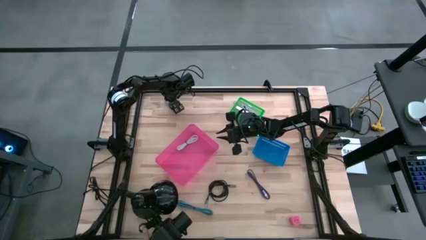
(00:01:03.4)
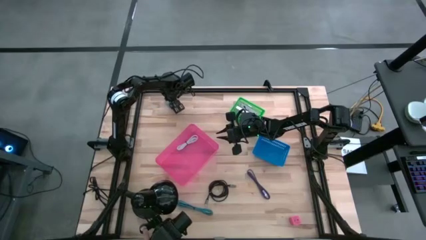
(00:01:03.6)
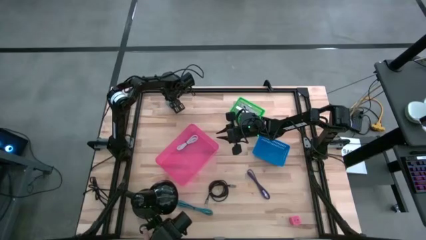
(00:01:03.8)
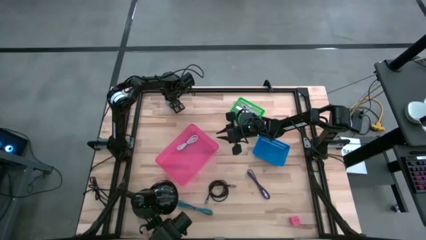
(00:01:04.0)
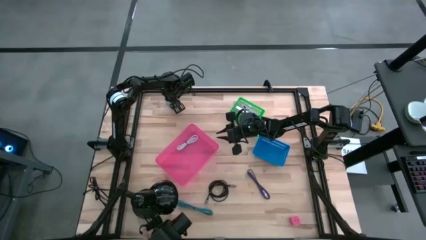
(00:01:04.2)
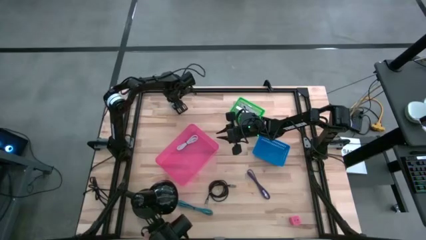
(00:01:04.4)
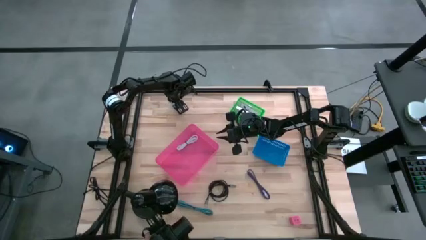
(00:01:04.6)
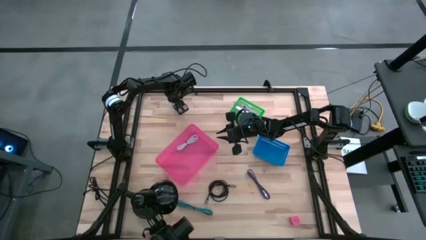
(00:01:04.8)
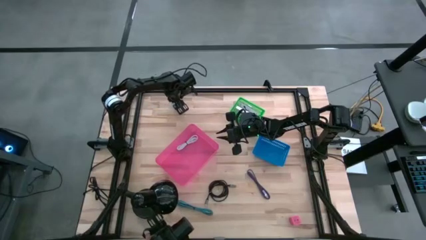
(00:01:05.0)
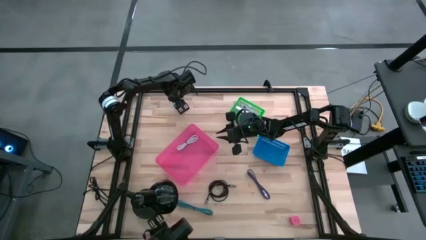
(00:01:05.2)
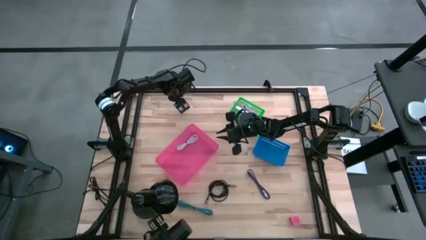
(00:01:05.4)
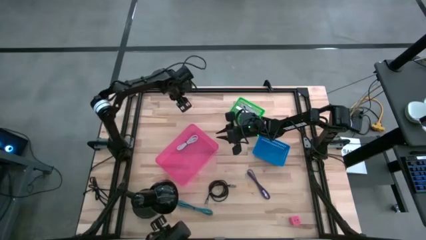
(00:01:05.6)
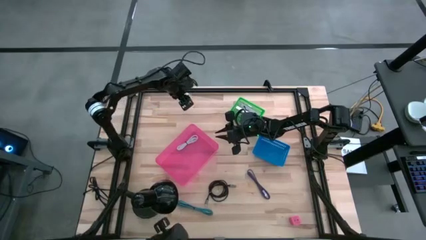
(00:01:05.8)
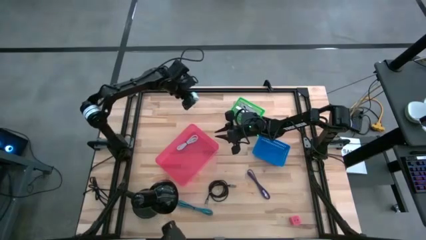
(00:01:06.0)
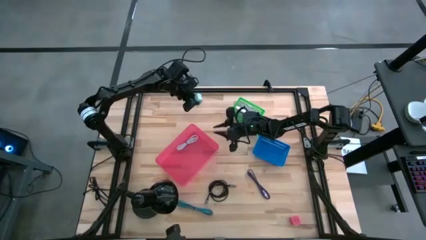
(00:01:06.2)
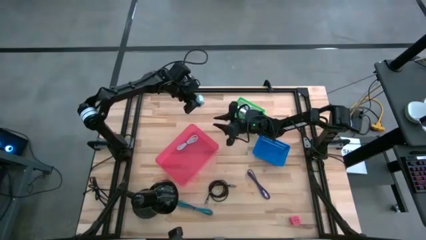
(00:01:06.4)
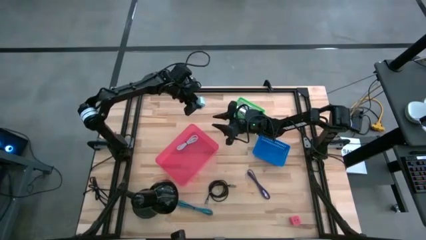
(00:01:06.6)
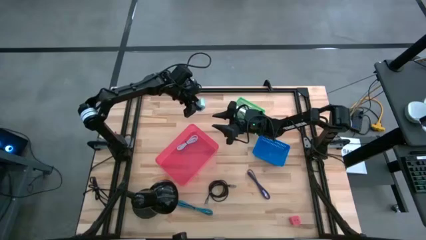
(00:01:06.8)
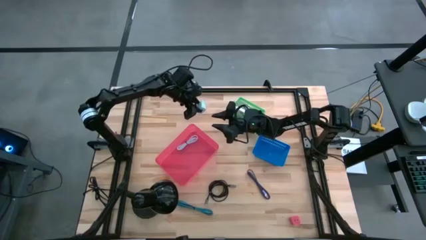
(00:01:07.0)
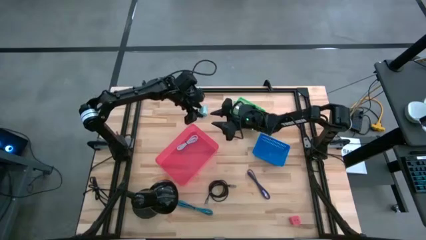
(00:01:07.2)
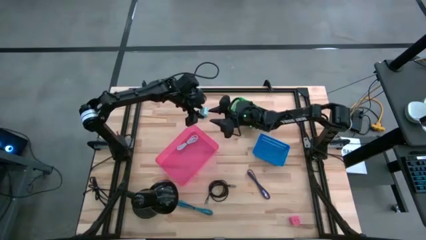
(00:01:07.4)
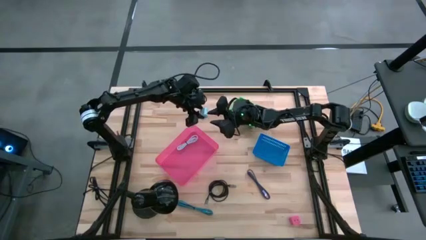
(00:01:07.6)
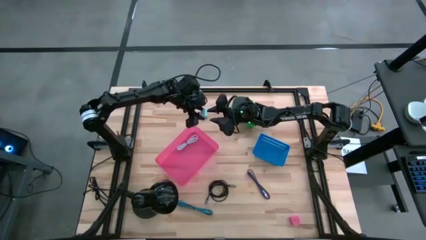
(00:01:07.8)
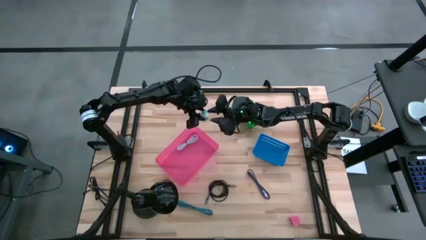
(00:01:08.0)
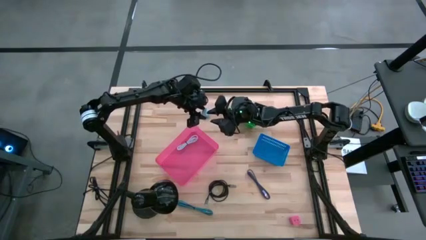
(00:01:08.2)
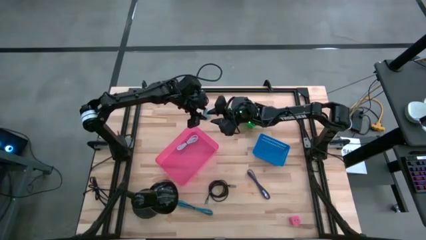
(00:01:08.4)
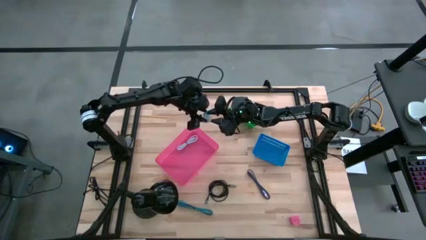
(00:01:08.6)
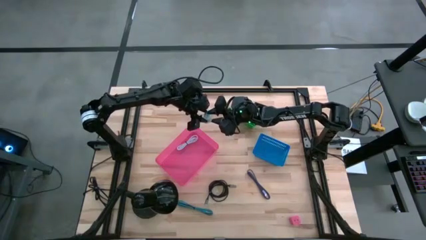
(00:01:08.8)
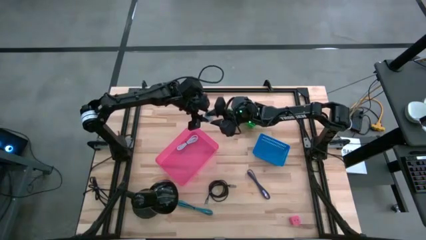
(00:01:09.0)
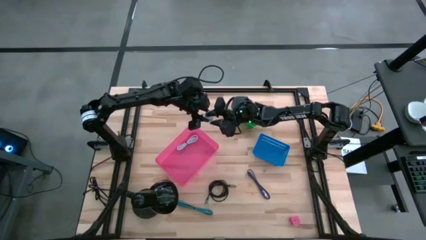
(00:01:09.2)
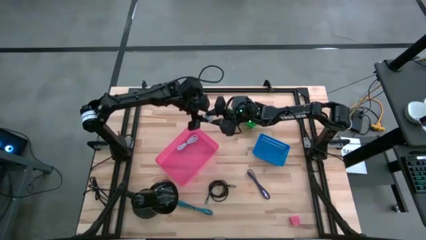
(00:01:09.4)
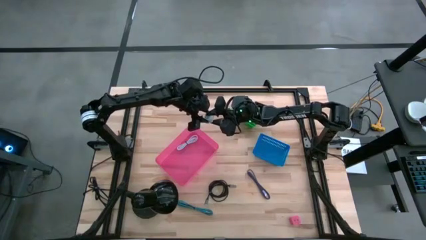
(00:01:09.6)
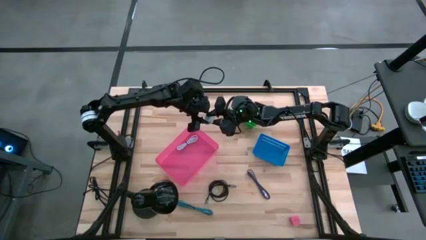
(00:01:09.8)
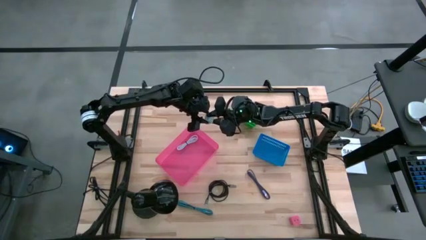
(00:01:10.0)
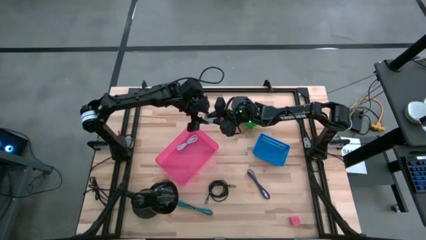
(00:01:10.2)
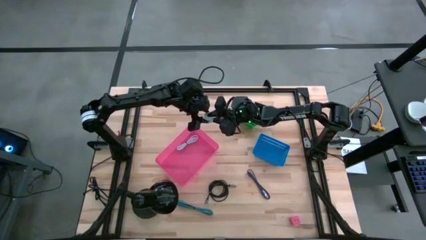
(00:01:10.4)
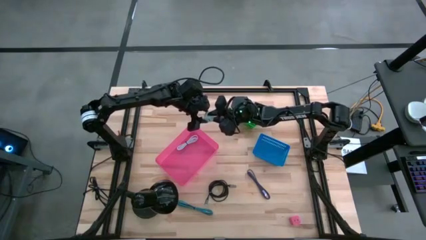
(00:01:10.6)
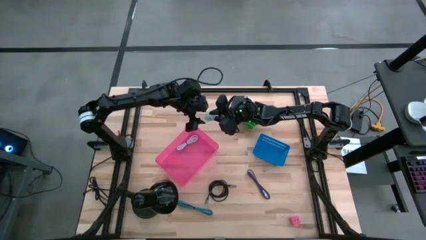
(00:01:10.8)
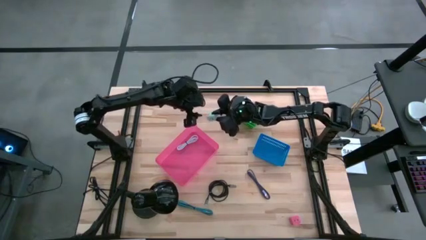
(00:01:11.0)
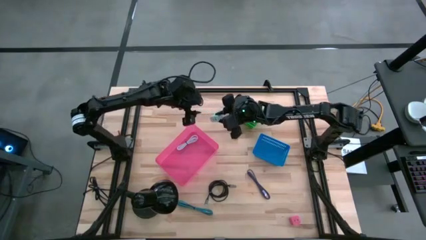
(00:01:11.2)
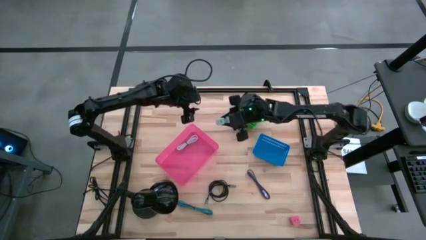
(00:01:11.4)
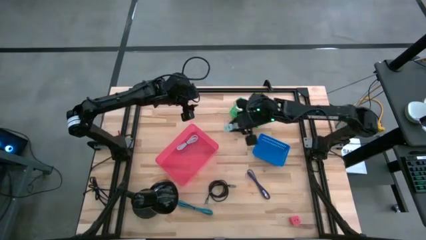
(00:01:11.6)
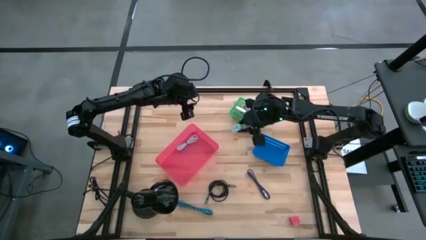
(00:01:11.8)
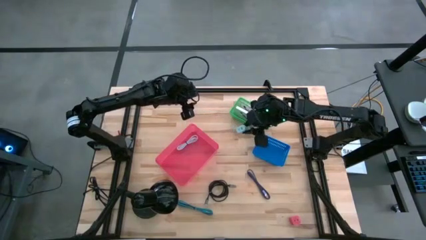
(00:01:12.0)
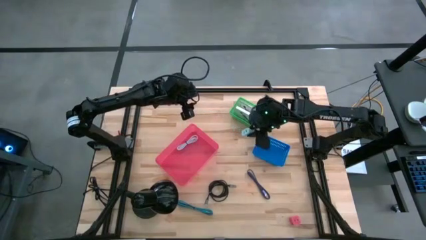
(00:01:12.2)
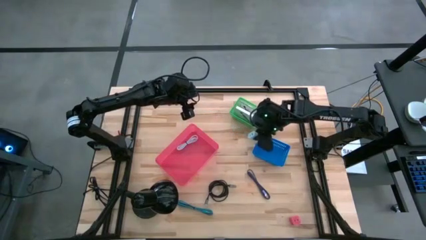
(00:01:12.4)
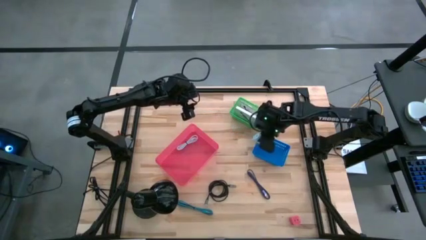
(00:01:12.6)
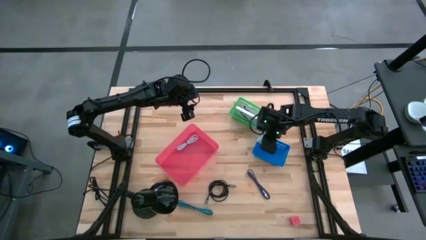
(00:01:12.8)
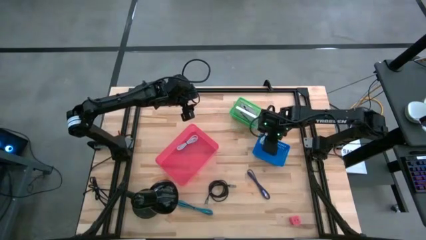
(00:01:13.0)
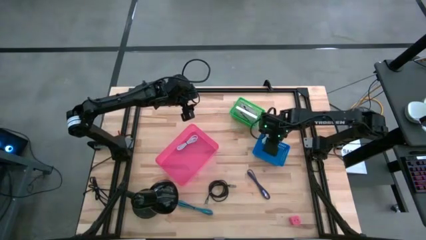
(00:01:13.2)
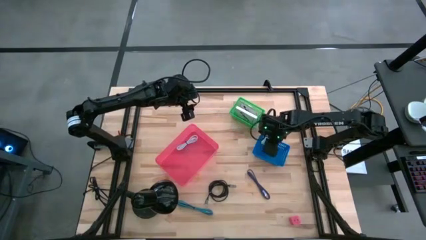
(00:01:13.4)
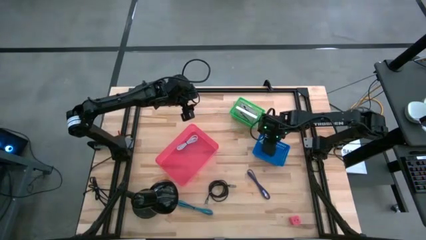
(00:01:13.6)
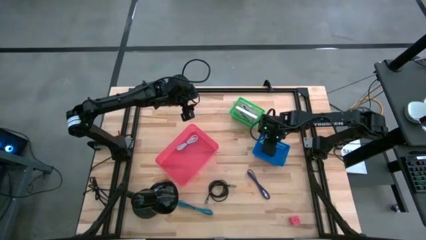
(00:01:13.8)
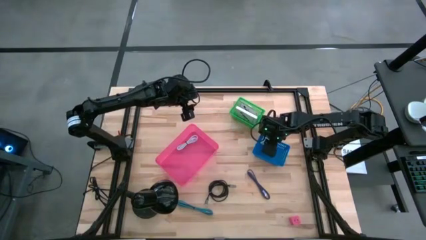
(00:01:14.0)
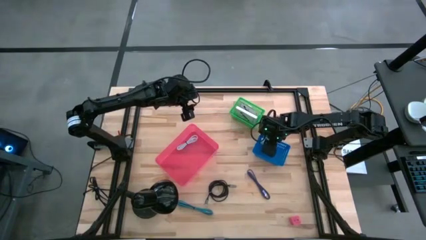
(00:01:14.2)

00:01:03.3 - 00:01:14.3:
Task: Pick and place items into bin
Put the top white charger adapter into the blue bin

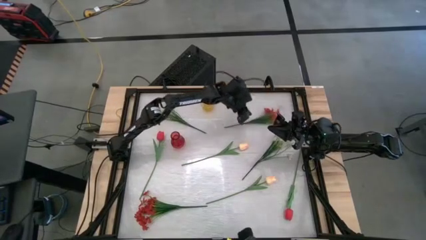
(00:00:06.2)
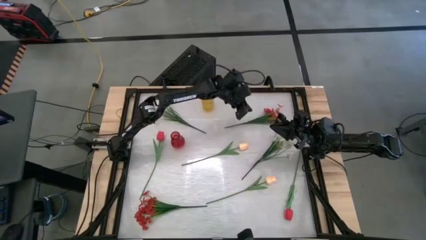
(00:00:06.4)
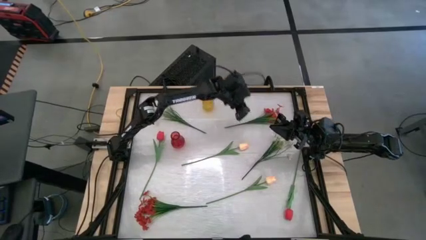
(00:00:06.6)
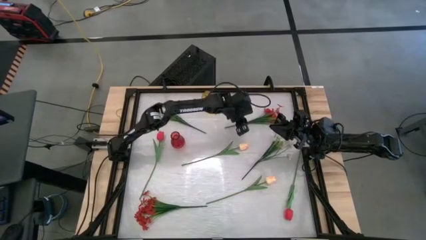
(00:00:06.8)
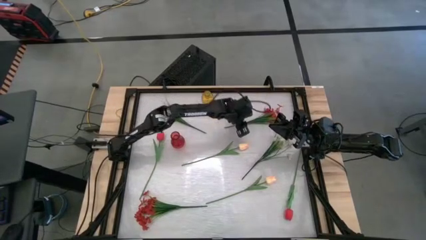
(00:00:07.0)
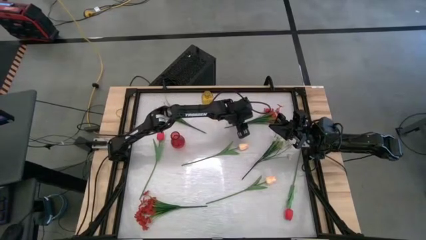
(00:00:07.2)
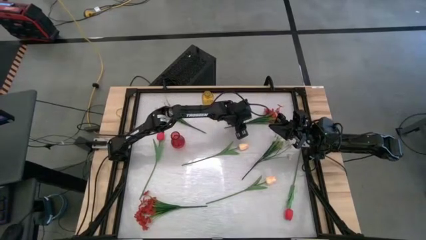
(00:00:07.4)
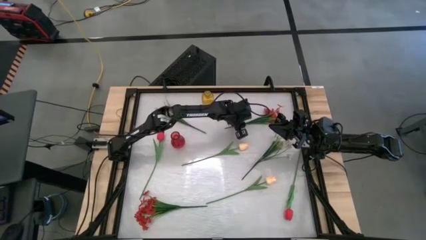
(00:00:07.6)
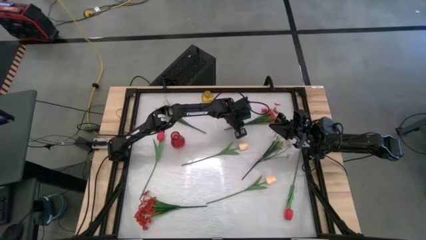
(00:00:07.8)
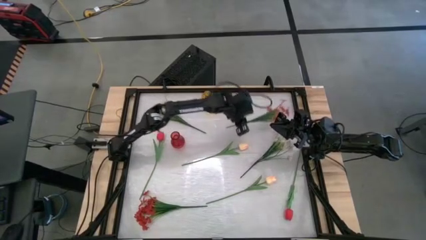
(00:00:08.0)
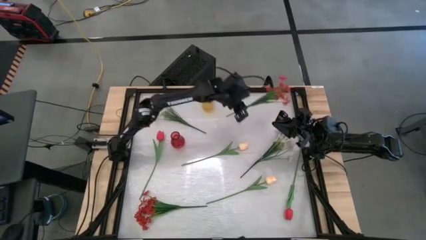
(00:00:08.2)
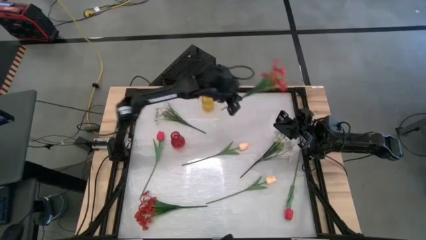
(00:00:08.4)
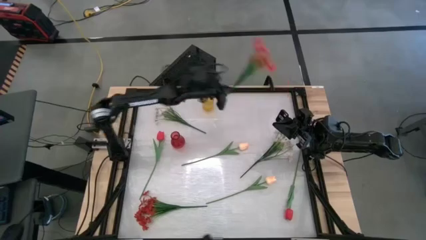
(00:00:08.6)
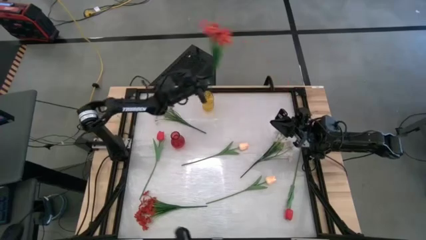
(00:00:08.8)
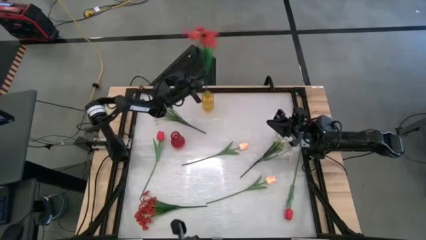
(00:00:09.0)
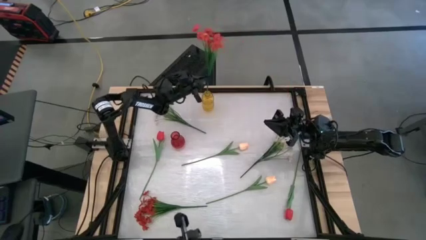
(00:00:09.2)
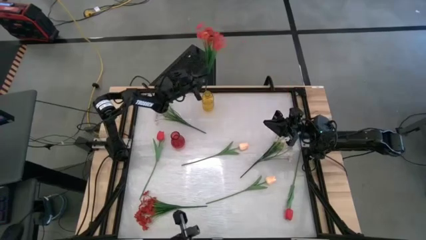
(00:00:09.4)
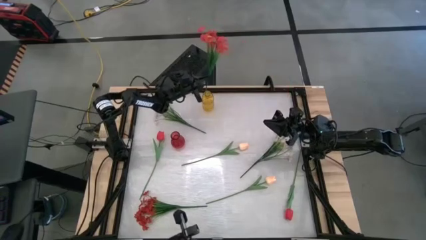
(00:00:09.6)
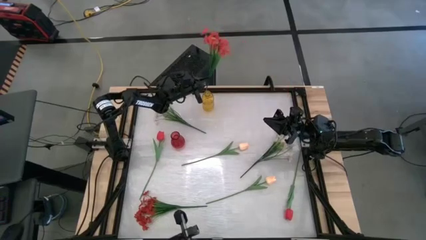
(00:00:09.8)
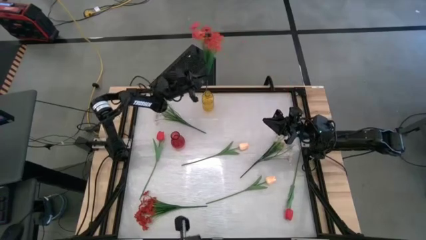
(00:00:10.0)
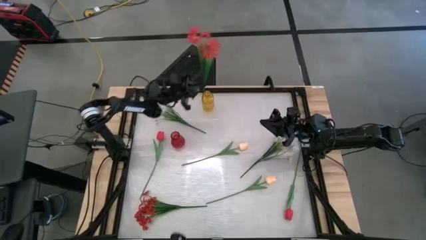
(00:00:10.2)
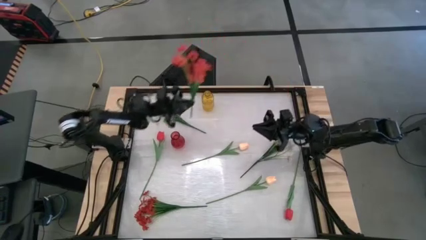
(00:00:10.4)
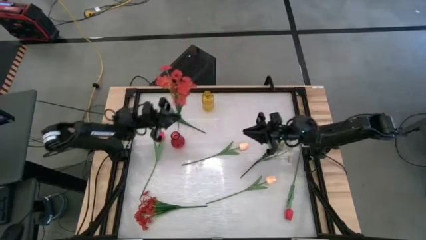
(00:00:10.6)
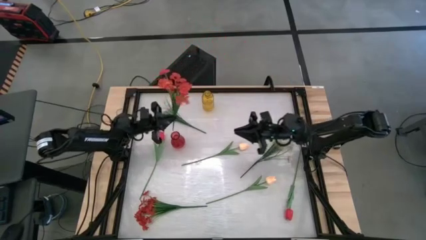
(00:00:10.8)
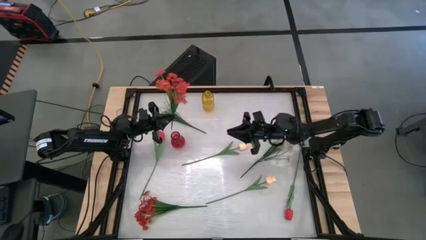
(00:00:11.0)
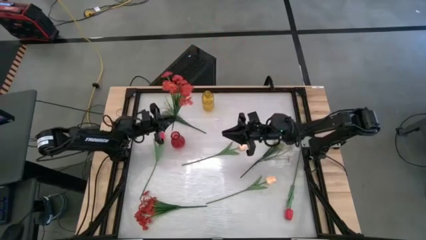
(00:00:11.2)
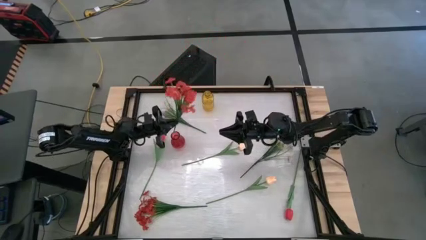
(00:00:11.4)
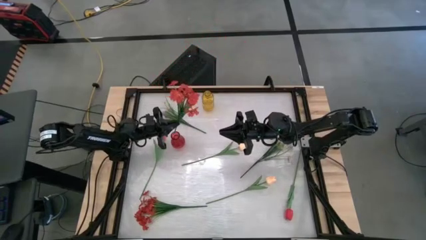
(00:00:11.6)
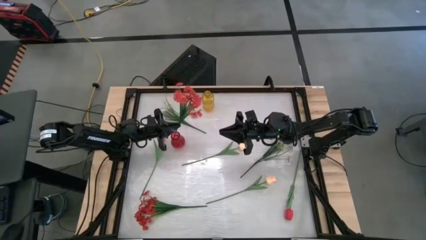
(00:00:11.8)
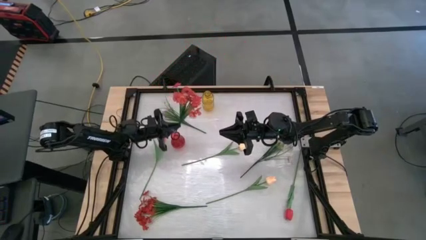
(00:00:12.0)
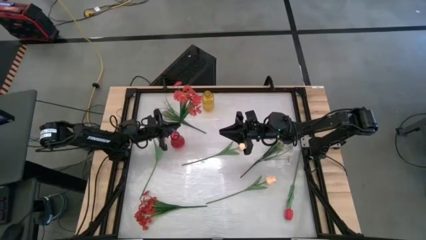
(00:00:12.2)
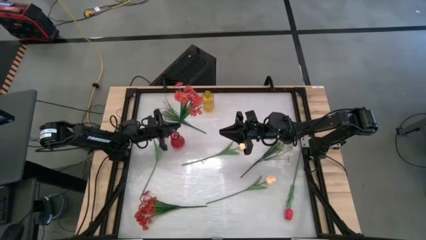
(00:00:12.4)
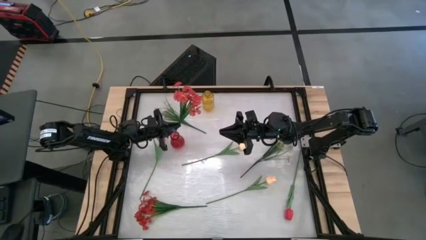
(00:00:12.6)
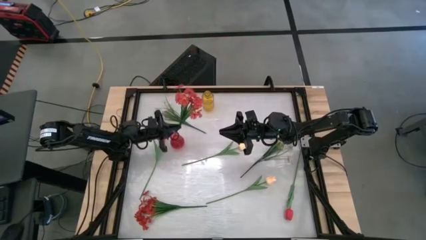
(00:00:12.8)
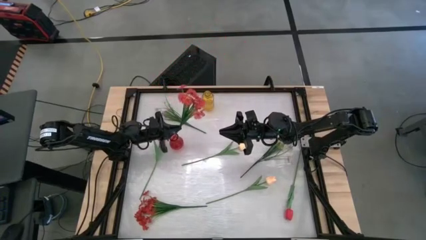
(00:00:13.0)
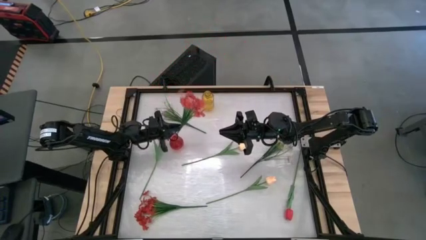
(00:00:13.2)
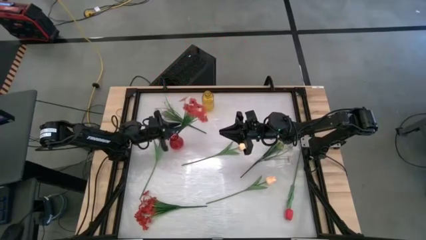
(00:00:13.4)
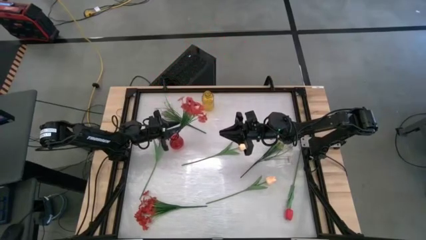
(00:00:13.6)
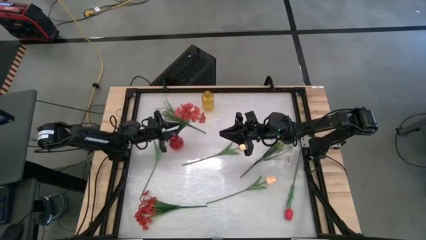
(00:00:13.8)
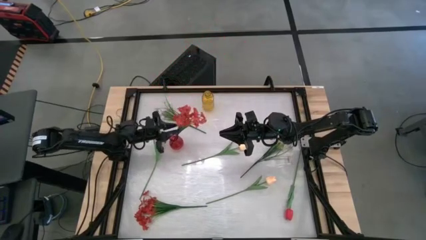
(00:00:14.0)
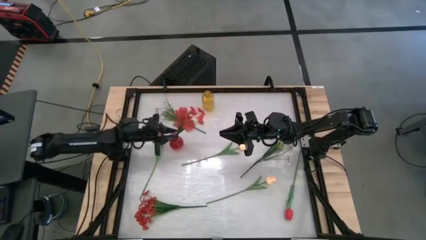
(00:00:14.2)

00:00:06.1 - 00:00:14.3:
Task: Sort flowers into vase by color
Put the top red flowers into the red flower vase
